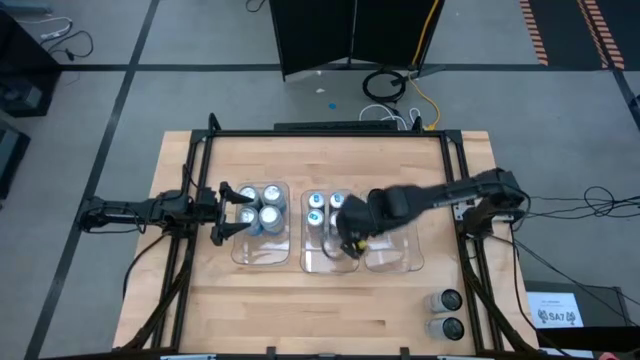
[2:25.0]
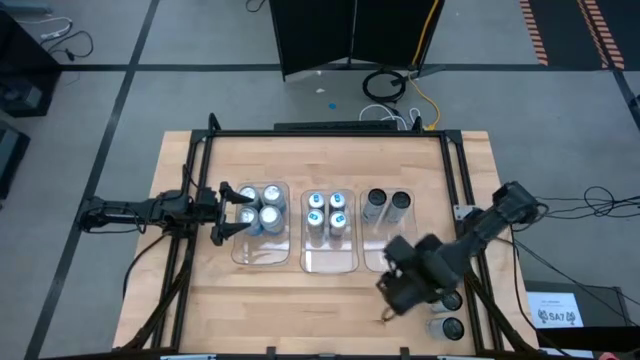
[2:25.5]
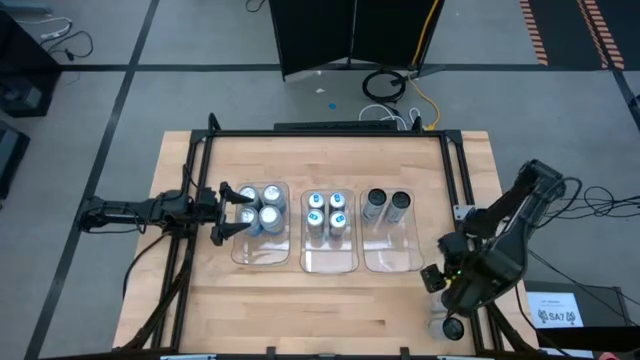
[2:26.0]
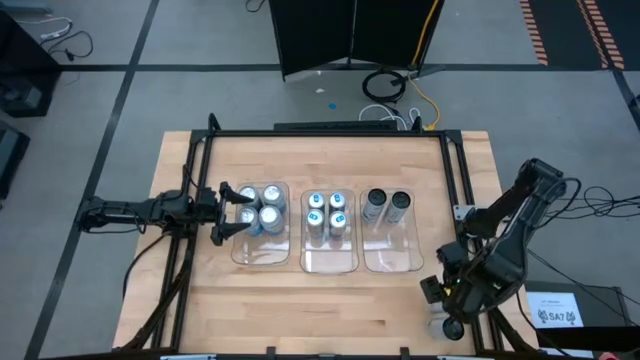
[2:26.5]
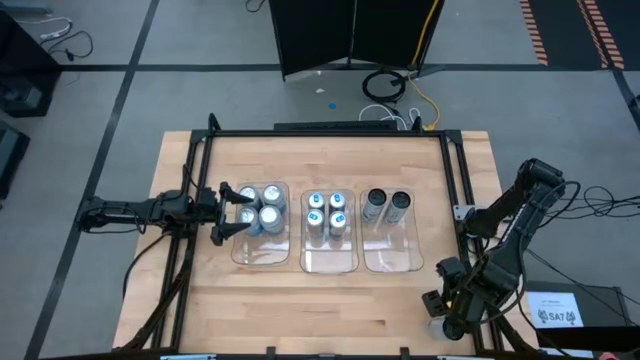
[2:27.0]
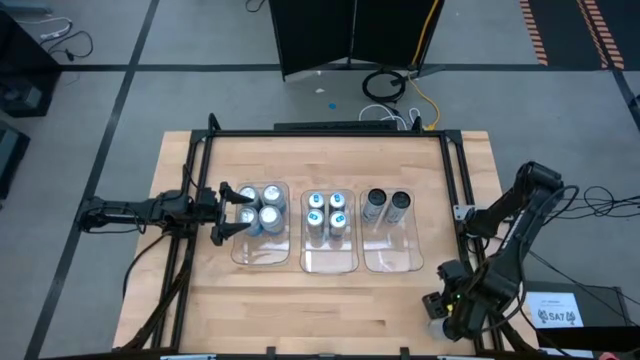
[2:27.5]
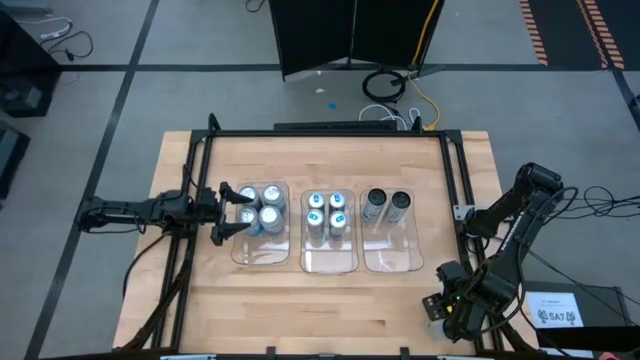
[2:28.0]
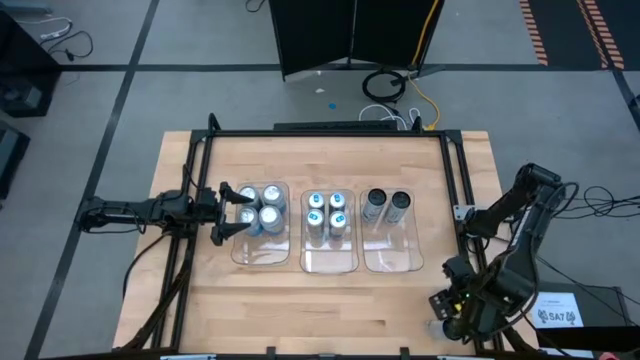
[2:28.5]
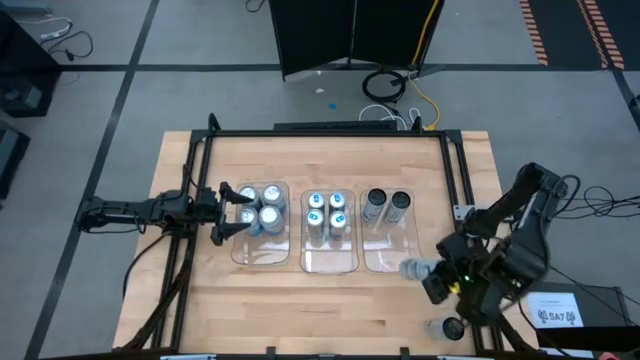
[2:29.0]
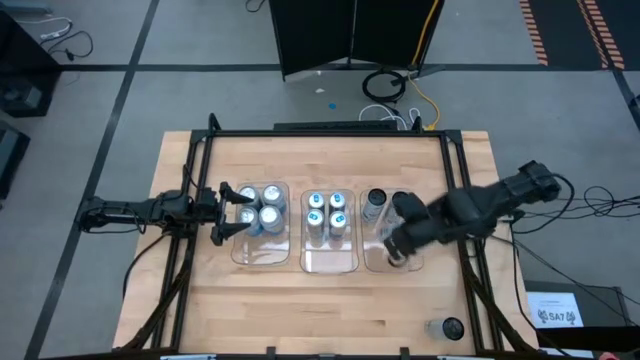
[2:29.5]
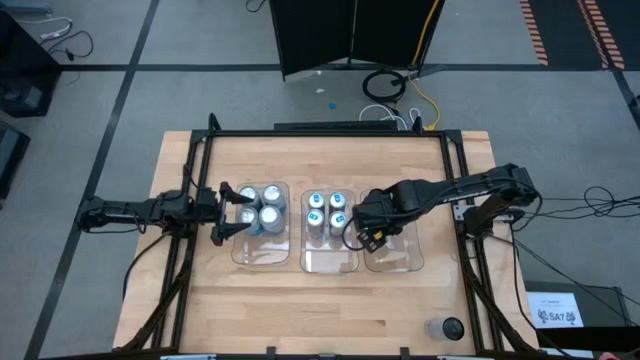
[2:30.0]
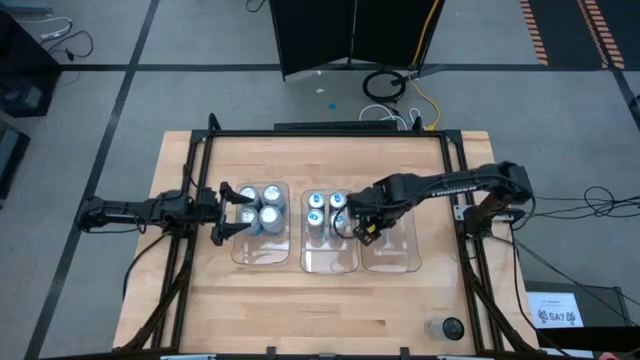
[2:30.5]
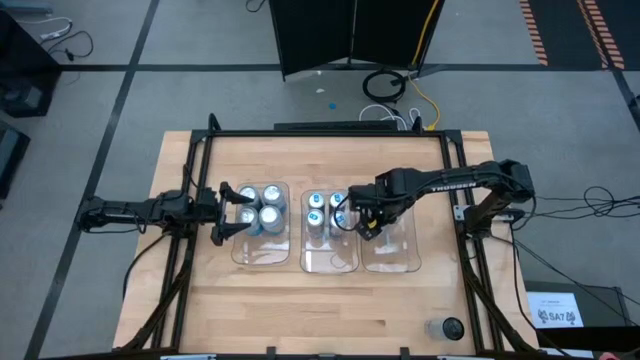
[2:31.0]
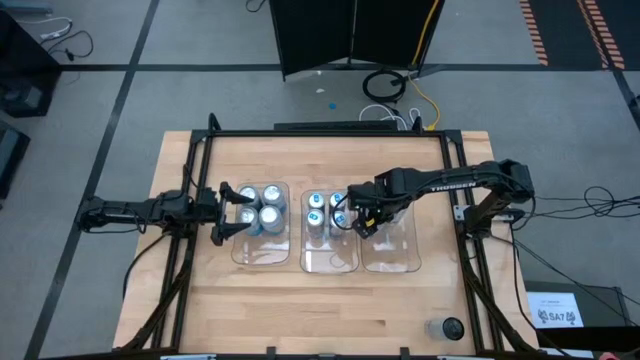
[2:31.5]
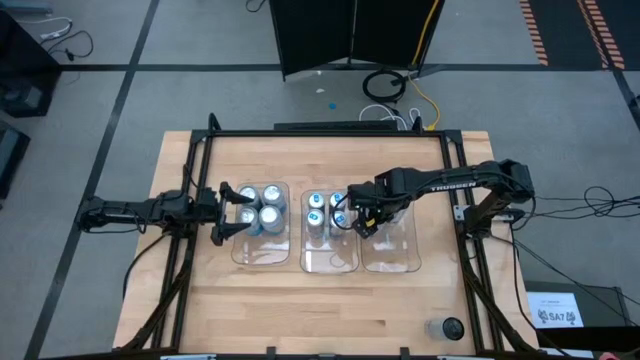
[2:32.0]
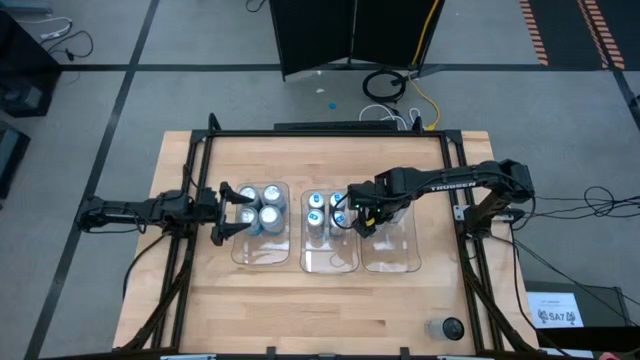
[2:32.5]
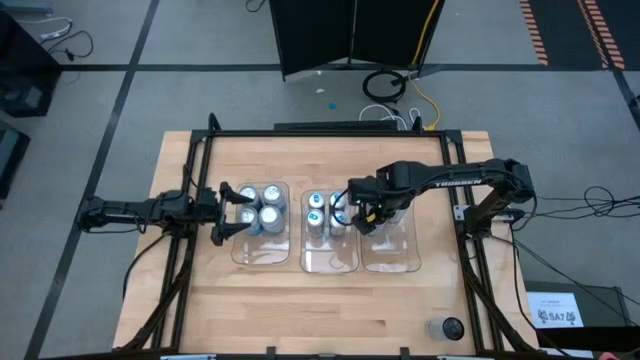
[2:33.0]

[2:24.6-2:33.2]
Task: Sort soda cans
Put the top white-blue soda can into the right transparent bin

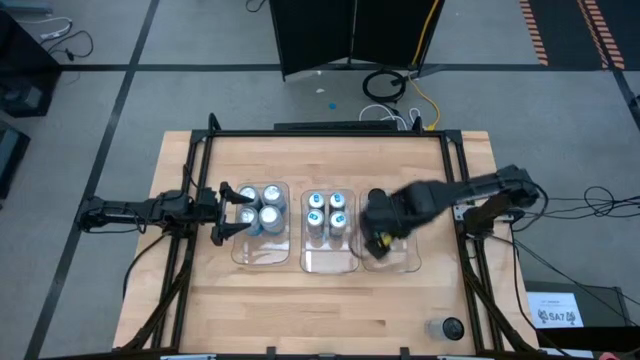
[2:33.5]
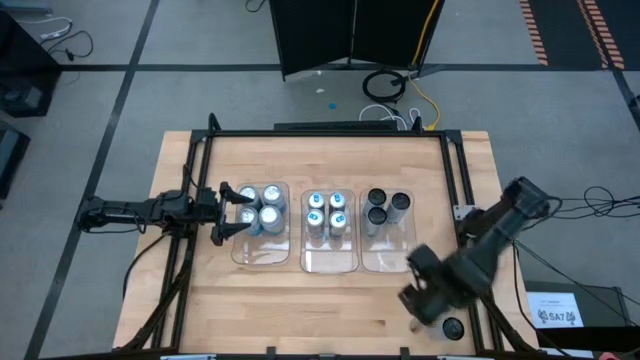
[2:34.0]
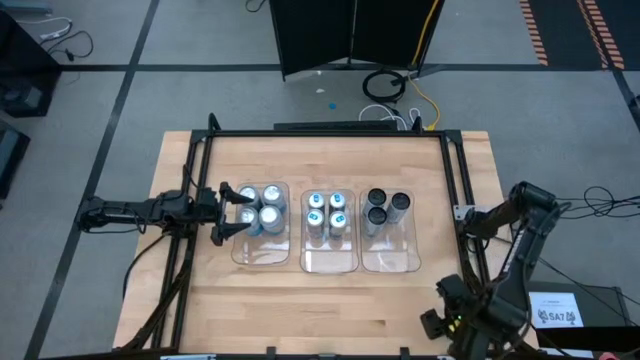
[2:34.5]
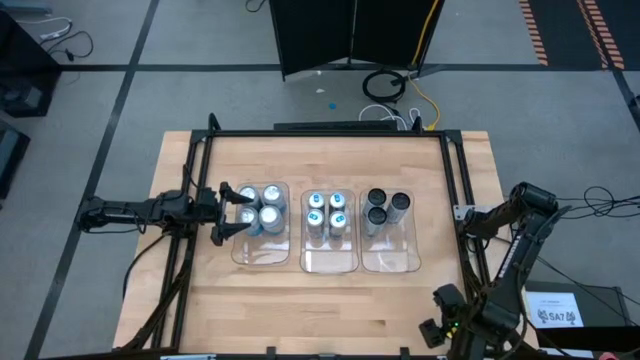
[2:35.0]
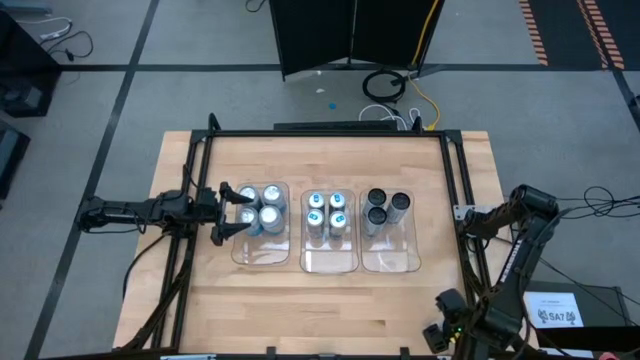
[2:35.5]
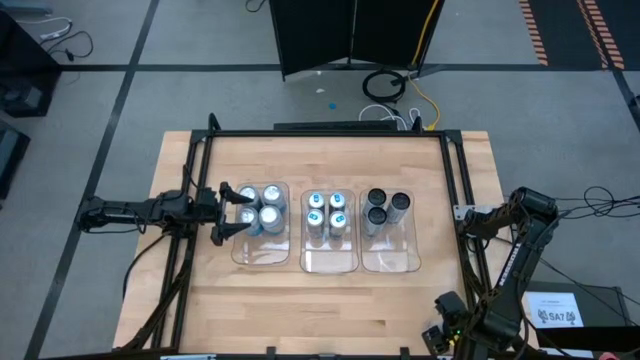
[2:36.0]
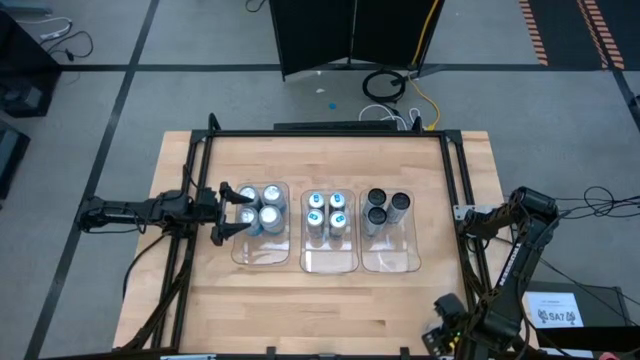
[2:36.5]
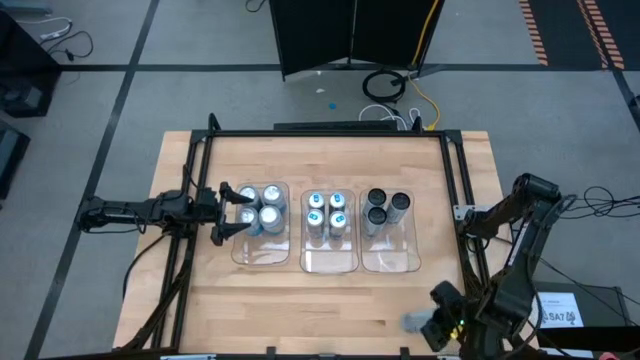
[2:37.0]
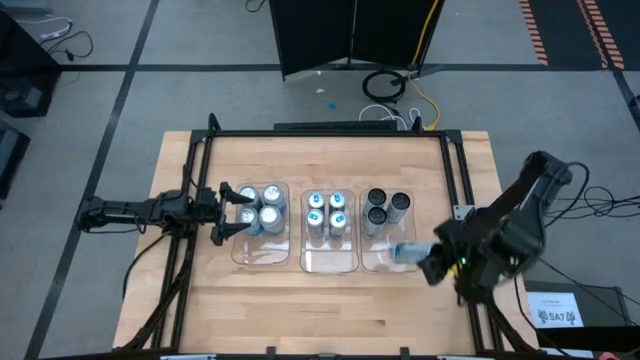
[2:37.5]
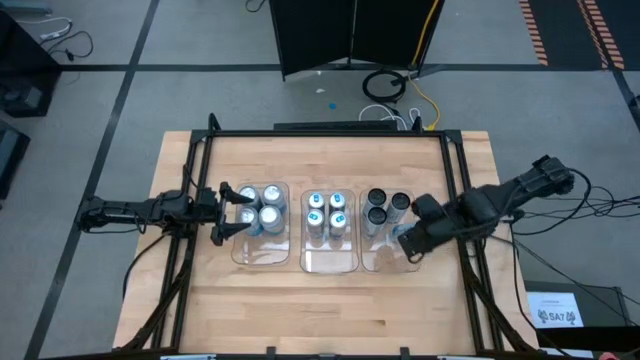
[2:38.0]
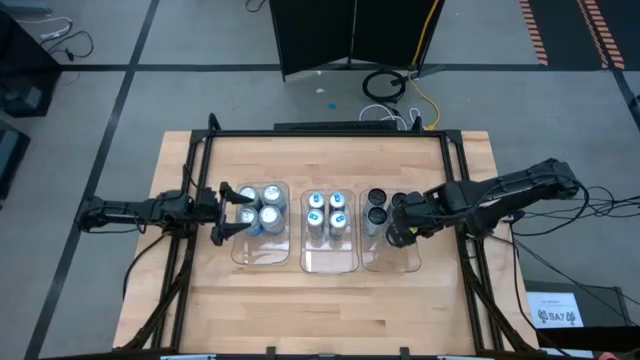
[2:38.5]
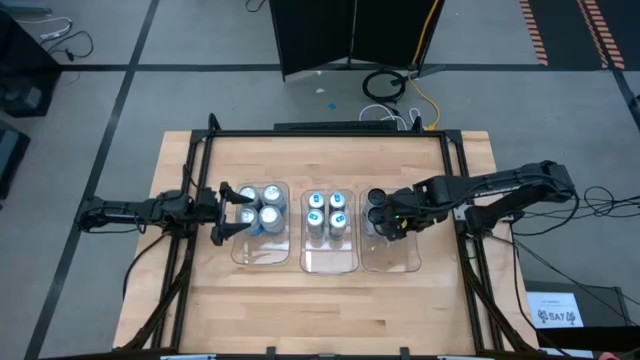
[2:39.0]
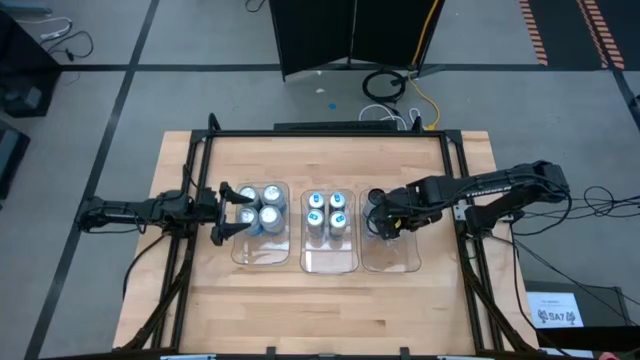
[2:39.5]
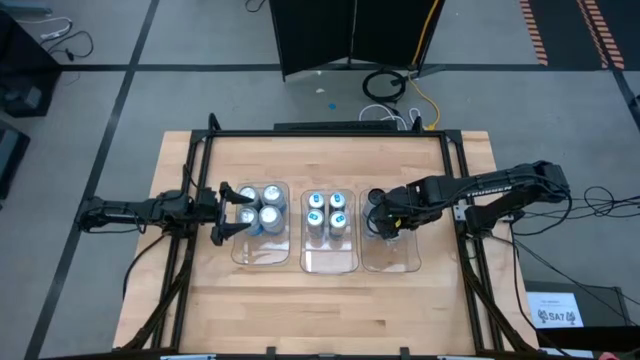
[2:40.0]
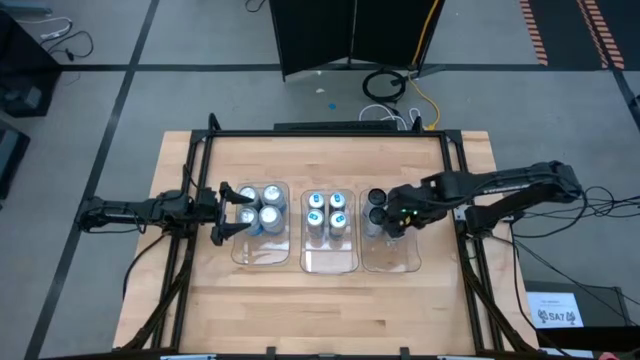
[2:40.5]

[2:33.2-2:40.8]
Put the white-blue soda can into the right transparent bin

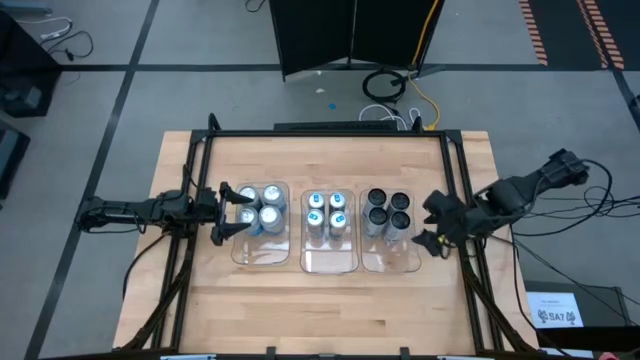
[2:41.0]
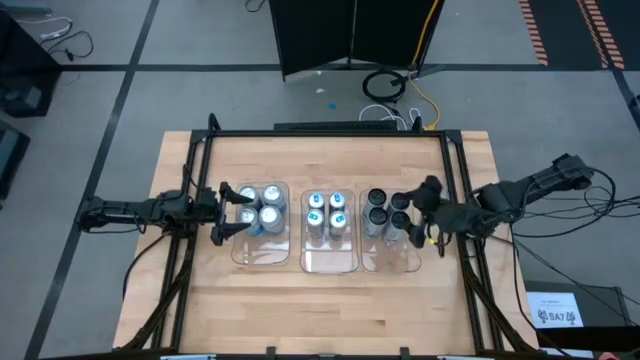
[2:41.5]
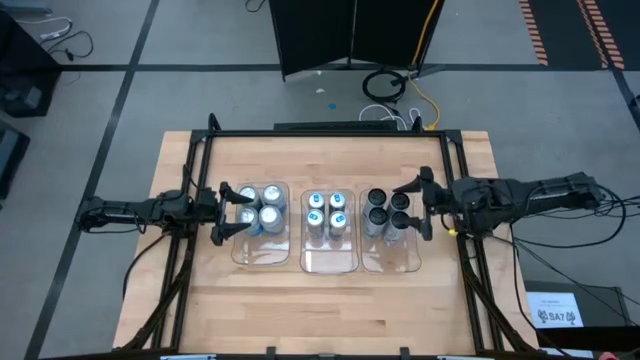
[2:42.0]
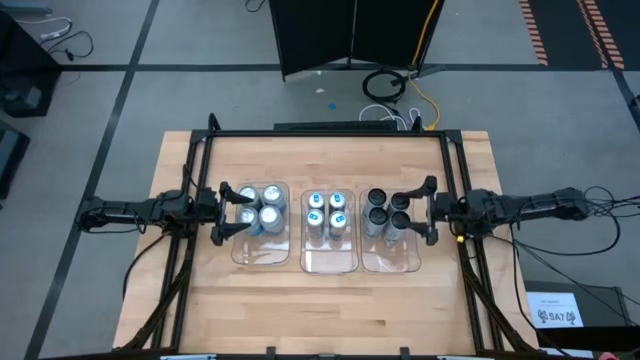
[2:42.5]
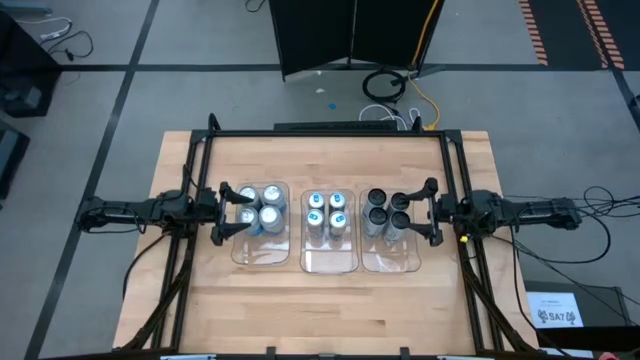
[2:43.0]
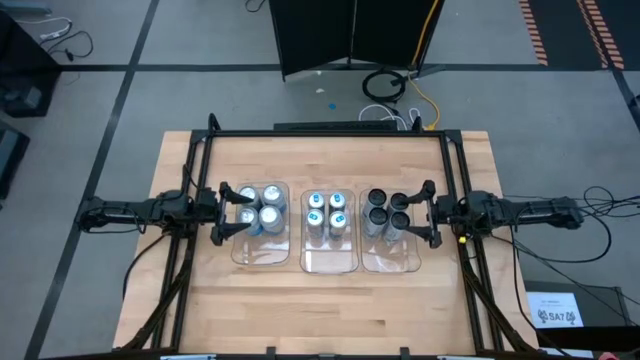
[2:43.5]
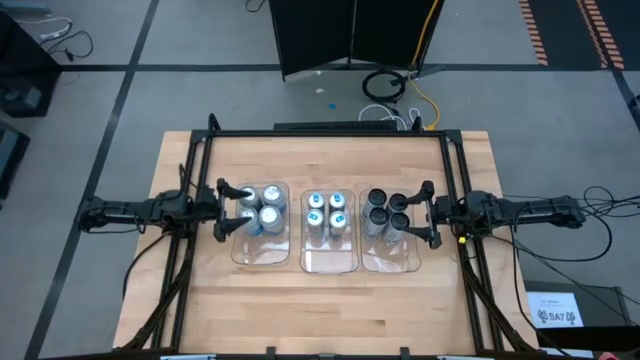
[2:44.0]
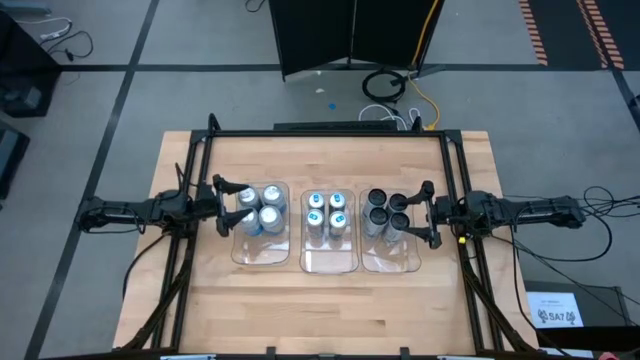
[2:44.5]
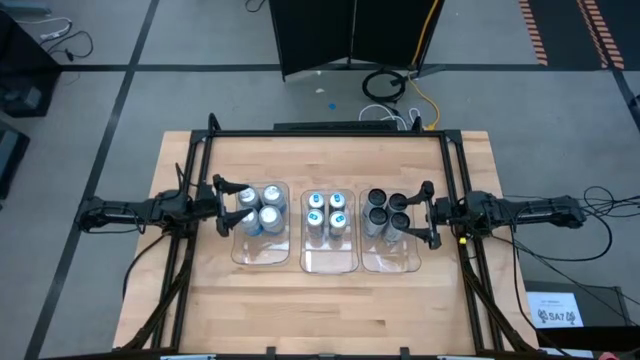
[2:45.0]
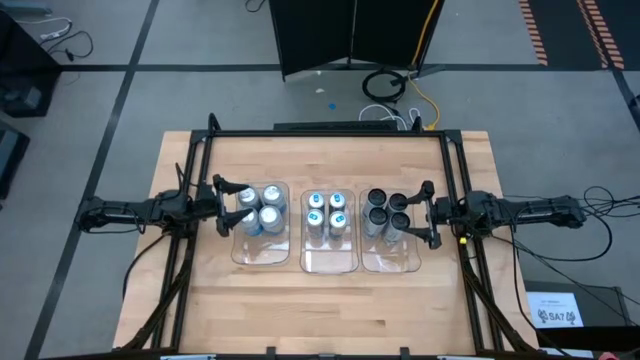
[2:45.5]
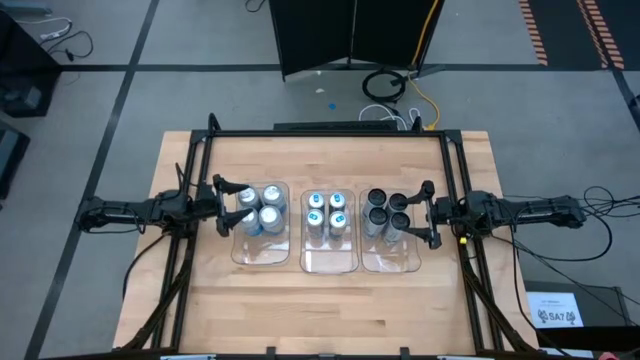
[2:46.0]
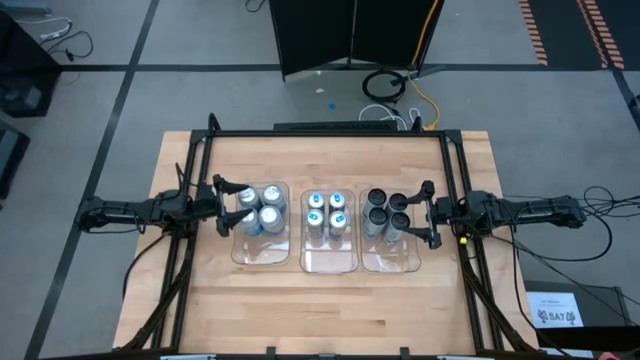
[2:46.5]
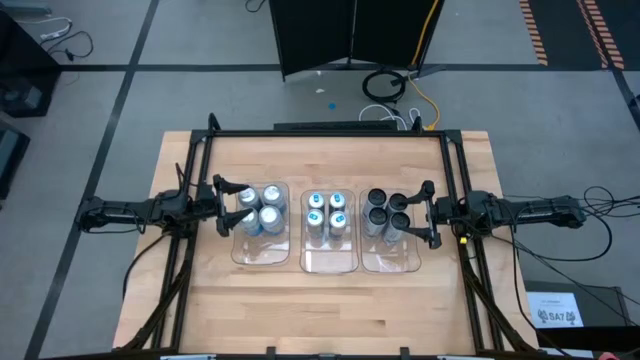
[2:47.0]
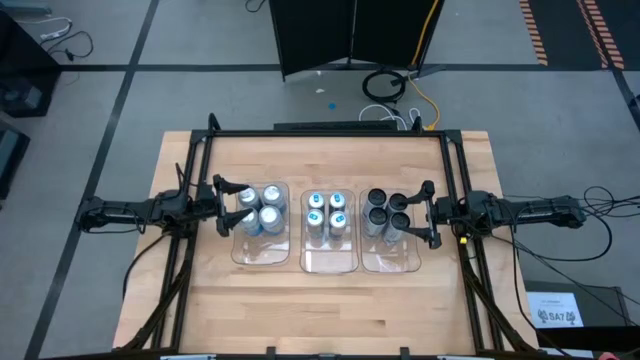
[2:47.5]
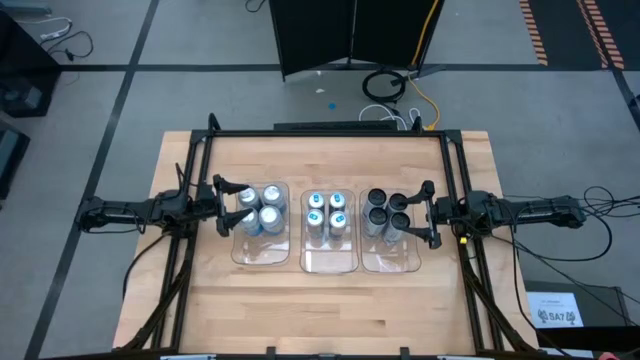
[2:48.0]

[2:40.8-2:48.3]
Return to Home Position
